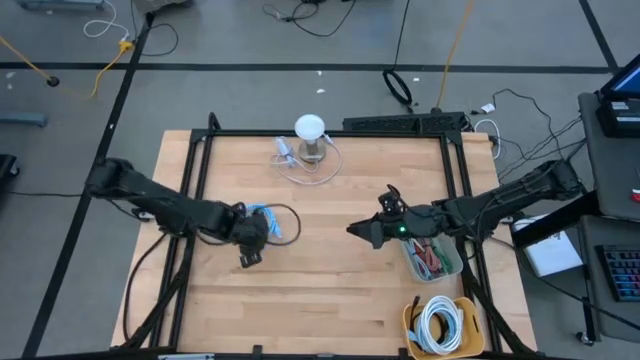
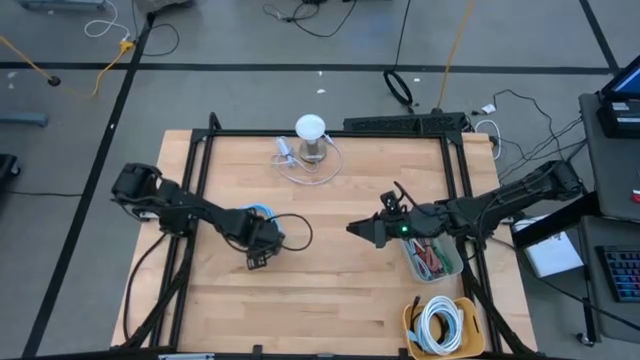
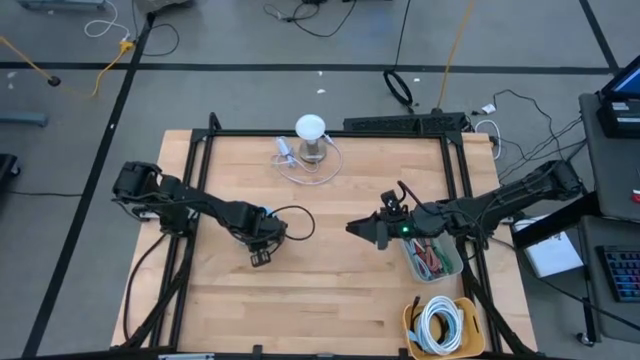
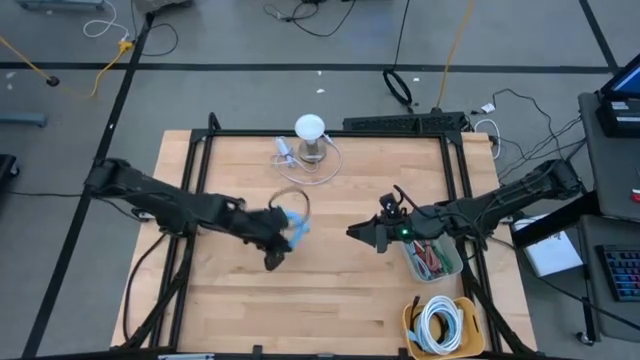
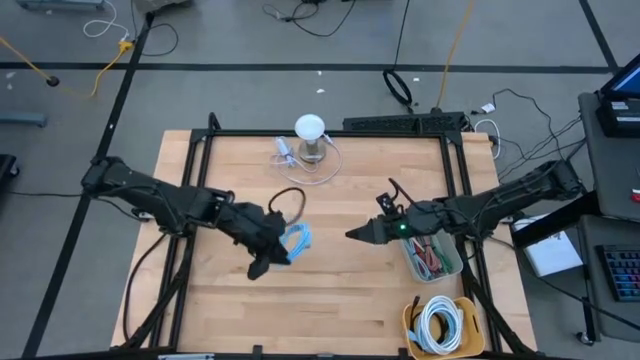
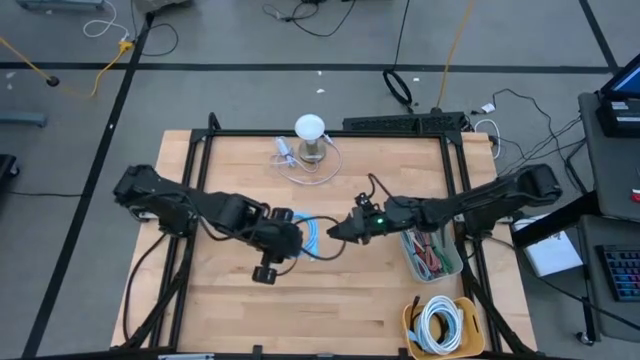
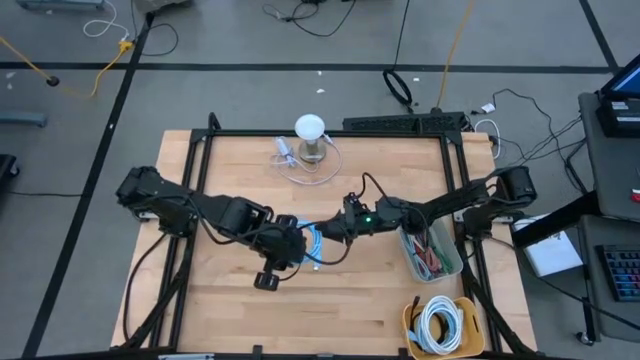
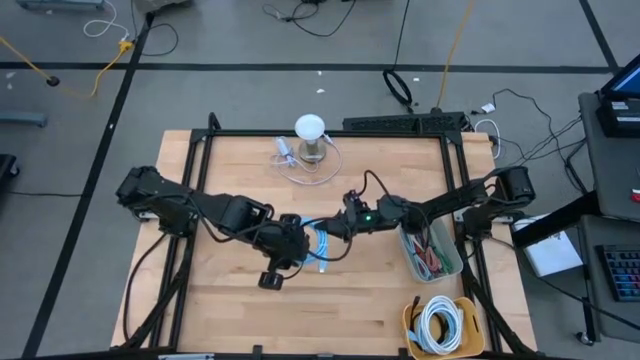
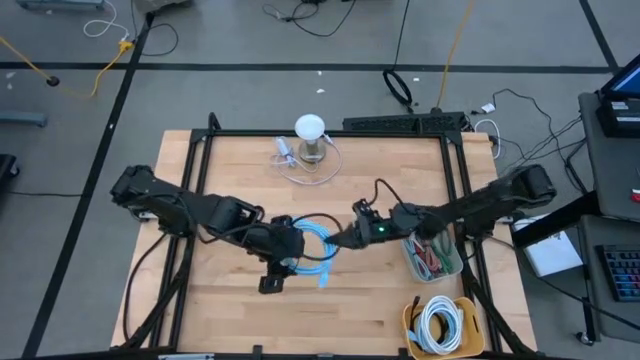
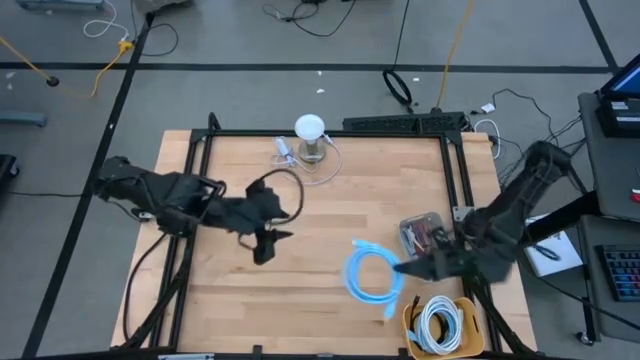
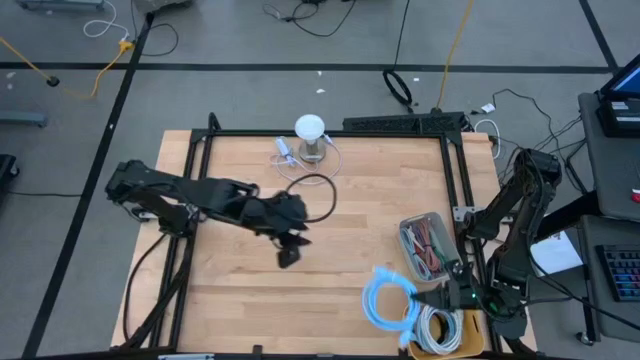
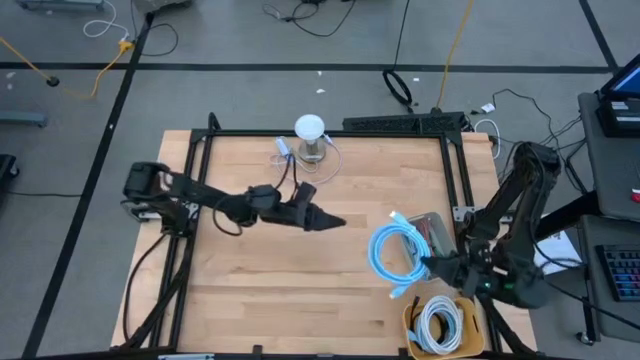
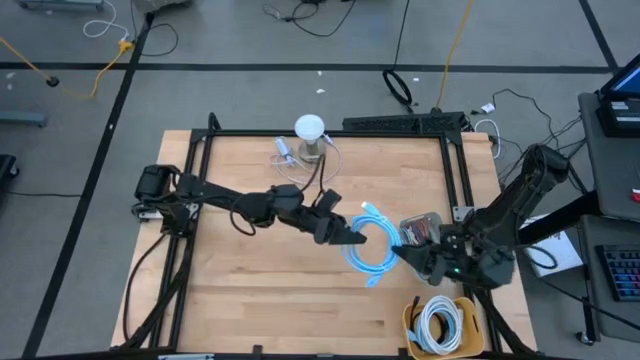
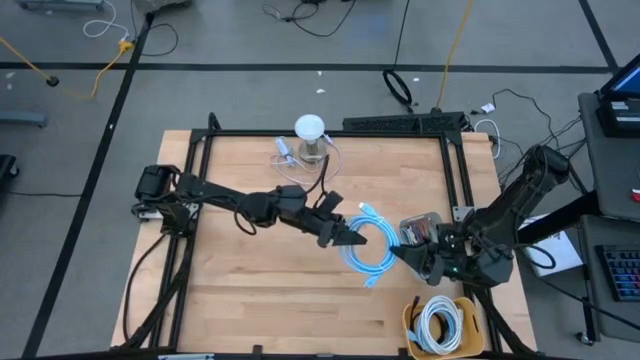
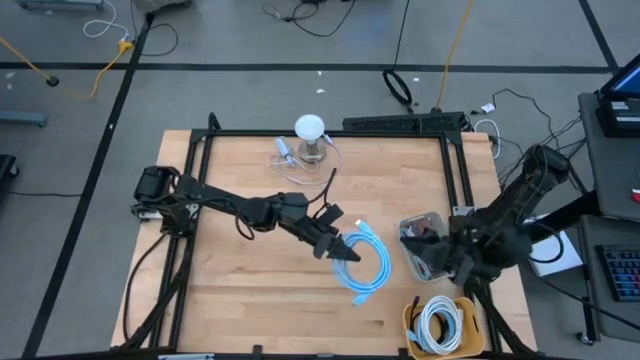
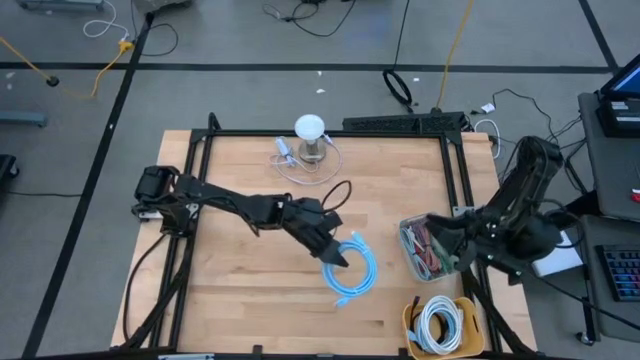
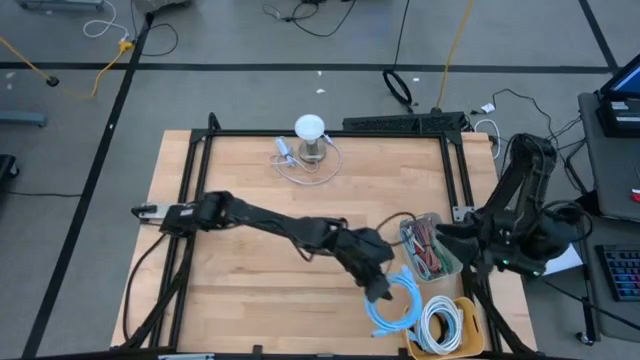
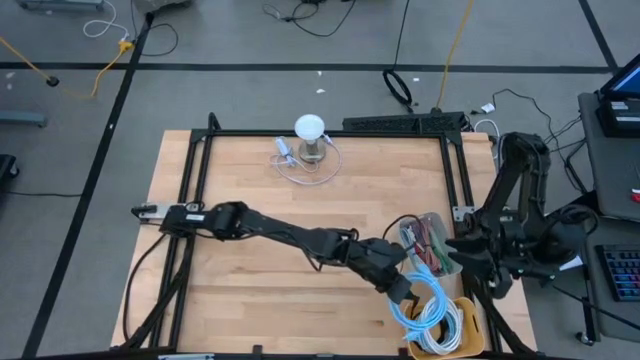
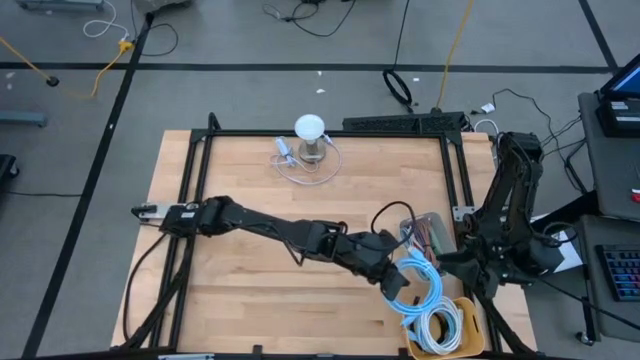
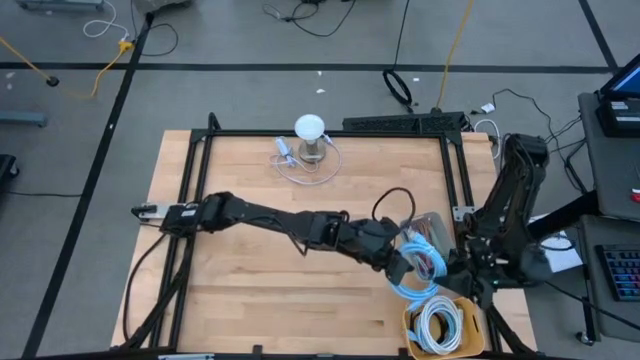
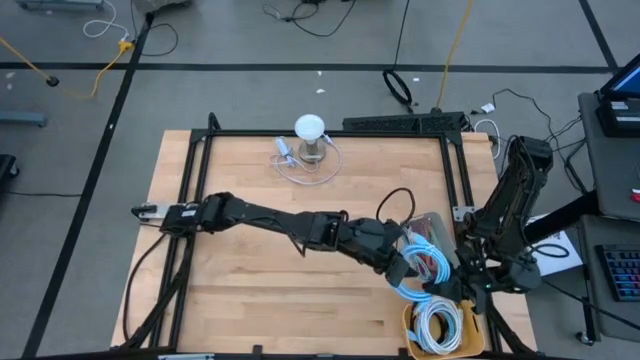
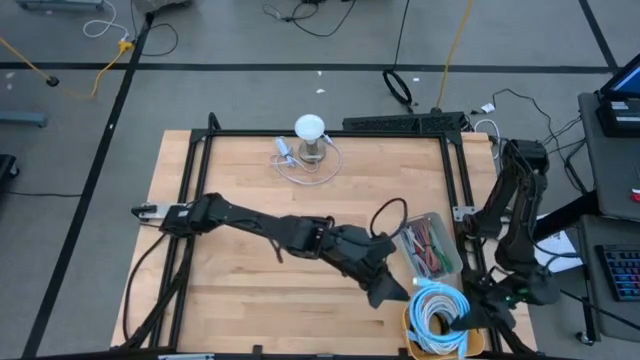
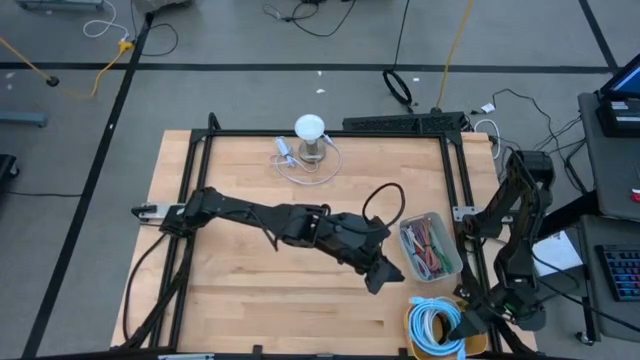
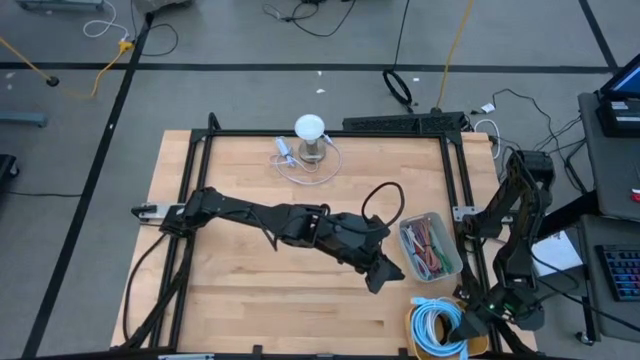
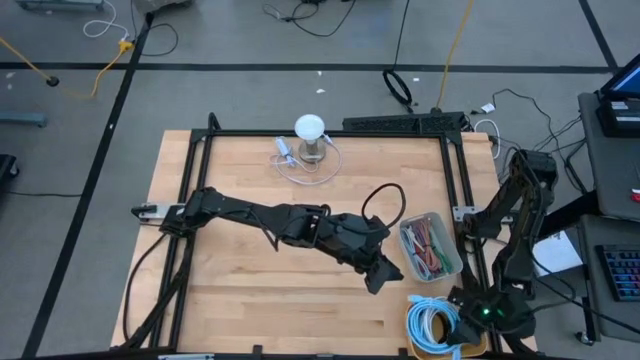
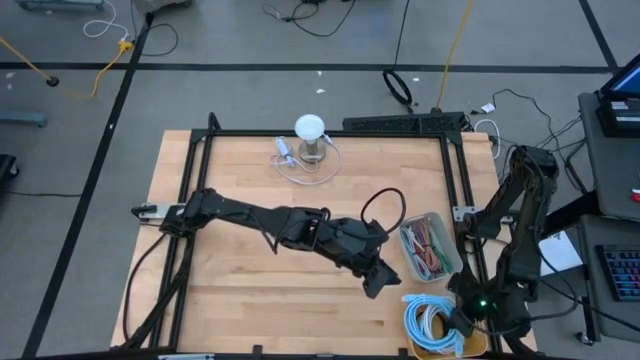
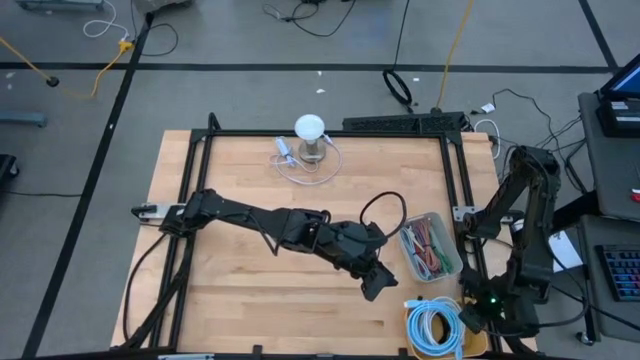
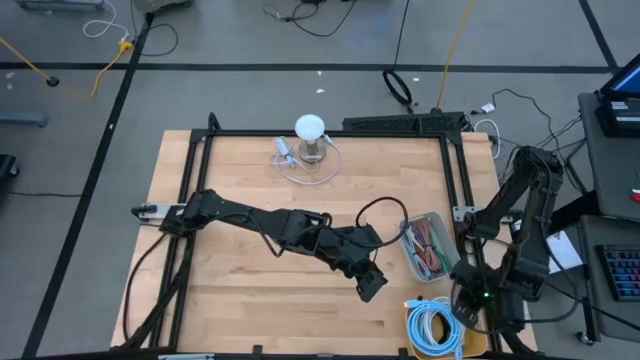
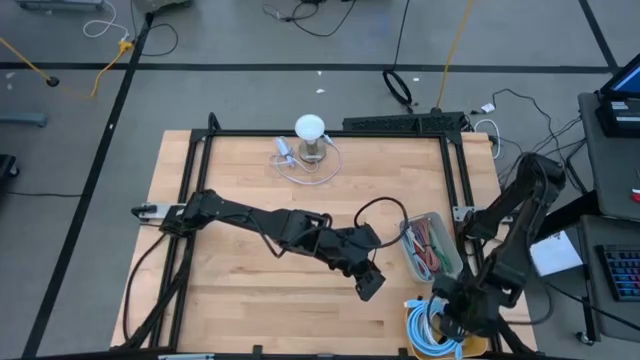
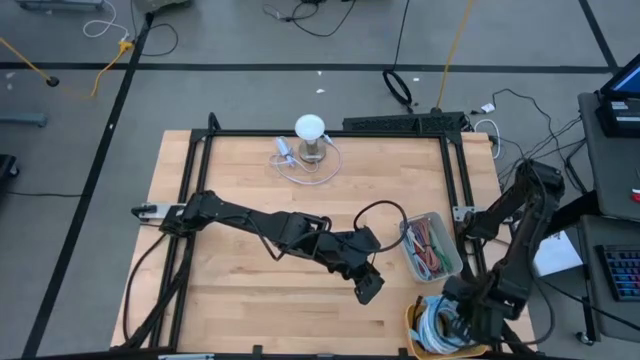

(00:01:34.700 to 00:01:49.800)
Task: Pick & Place USB Port
Put the blue HDMI cable into the yellow bin

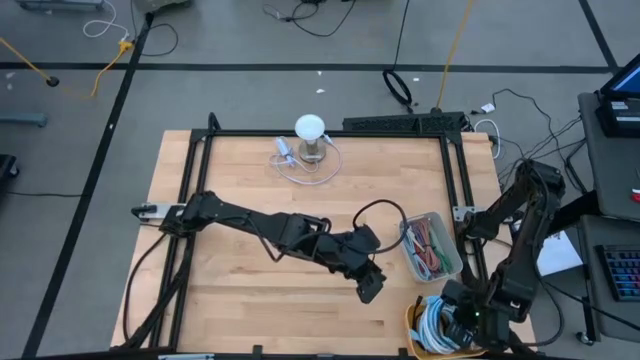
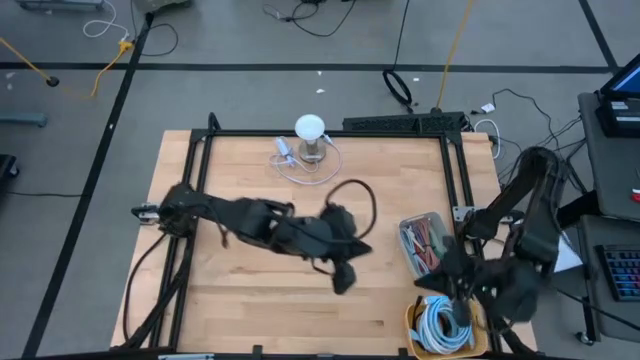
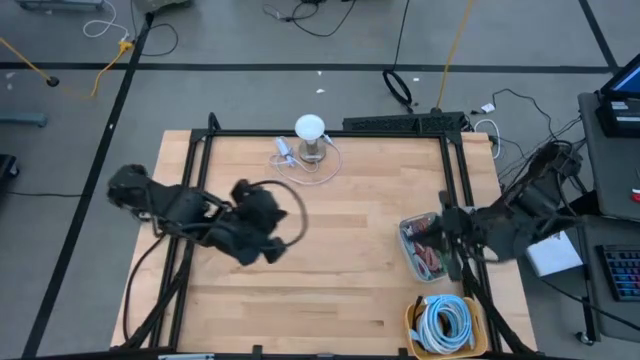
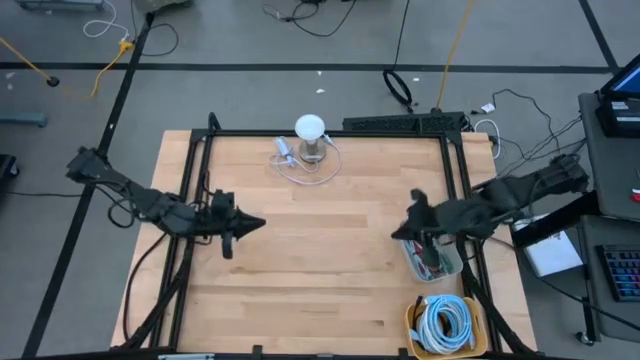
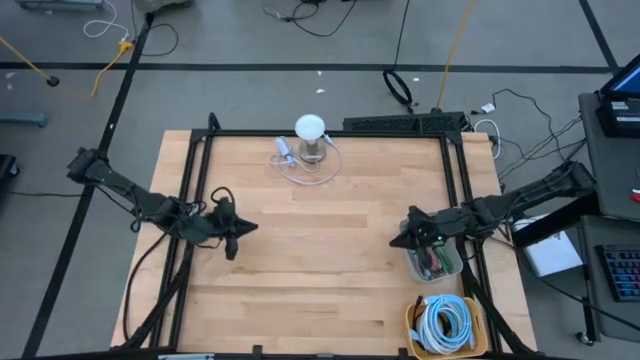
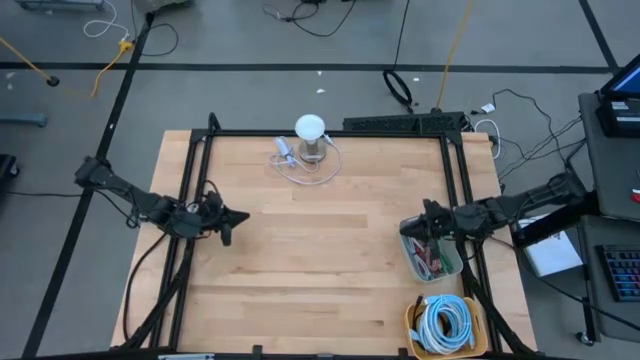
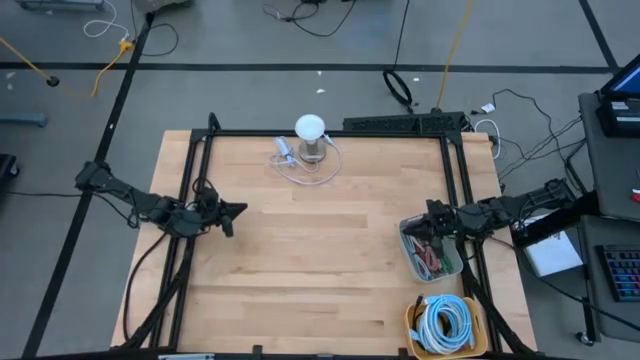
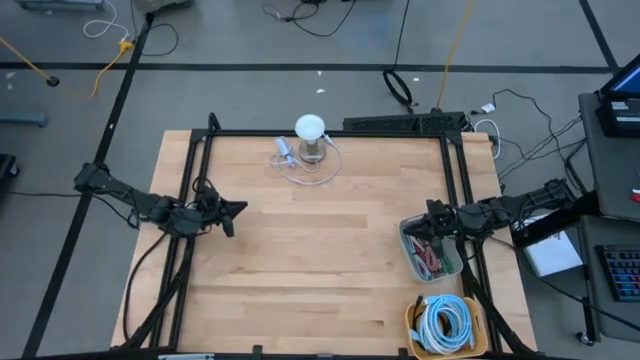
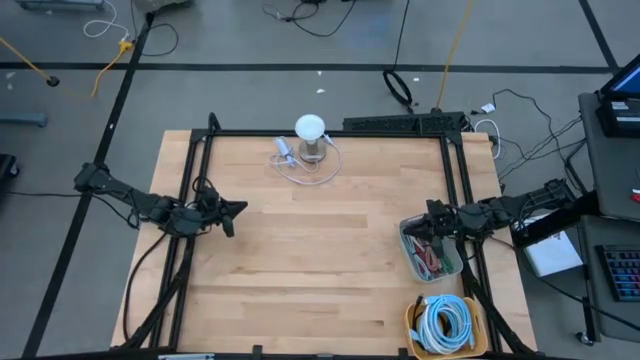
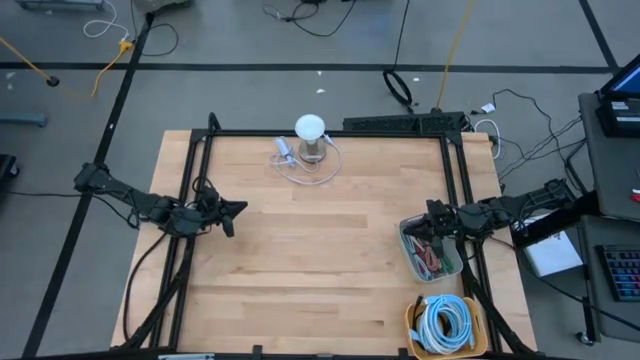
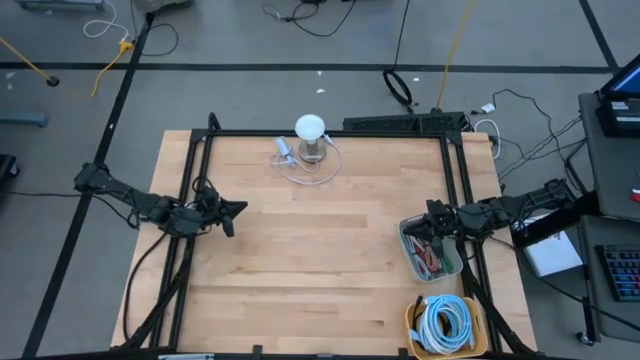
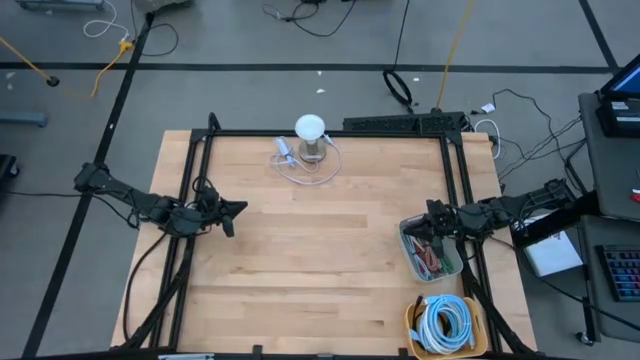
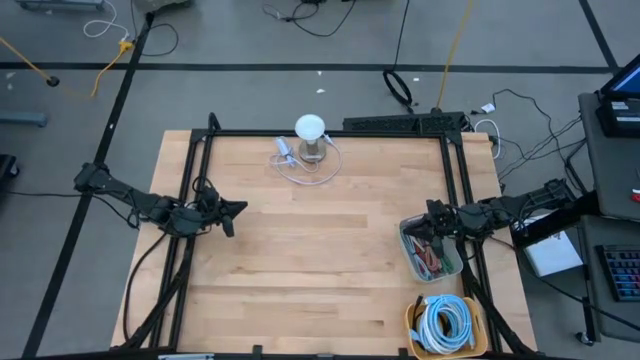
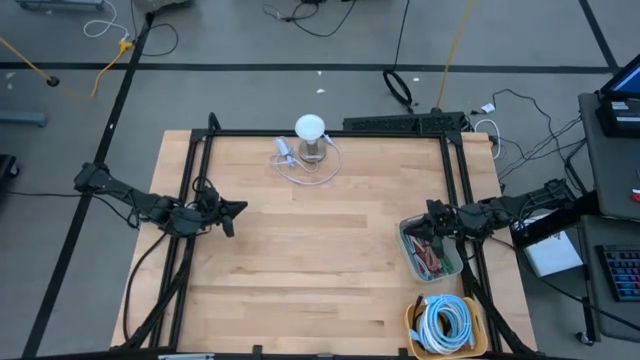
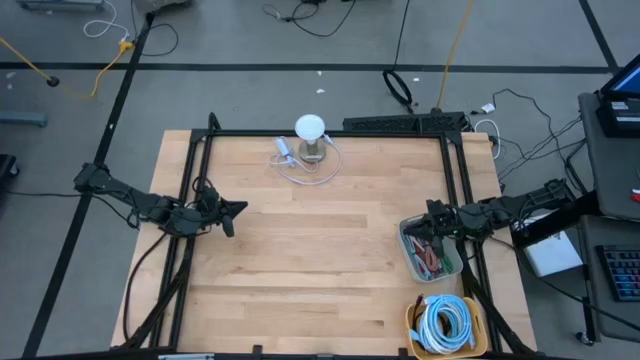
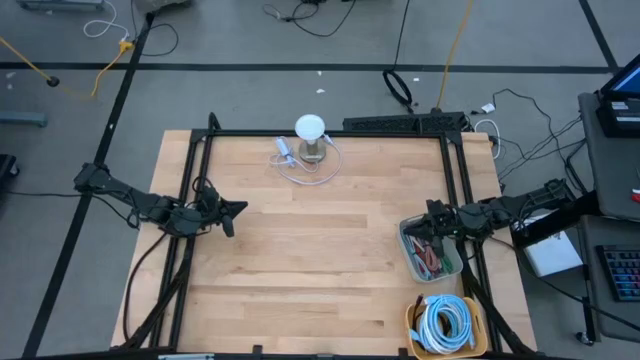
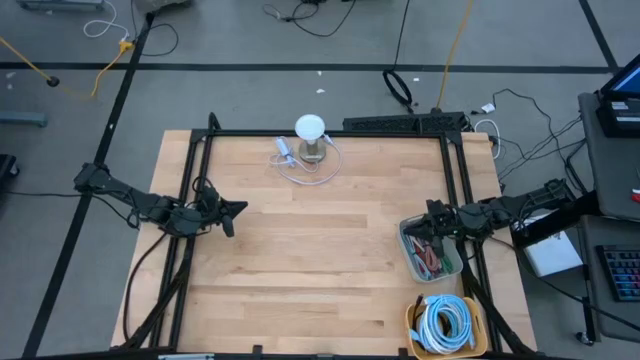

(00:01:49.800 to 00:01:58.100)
Return to Home Position
